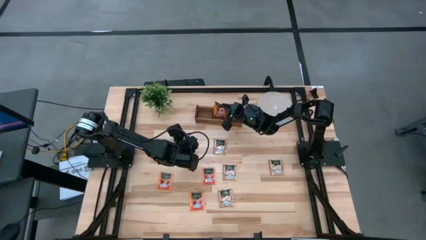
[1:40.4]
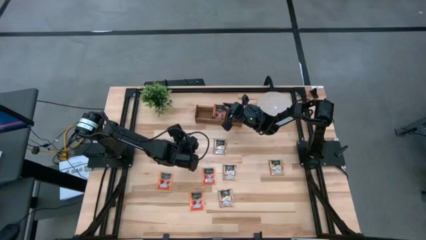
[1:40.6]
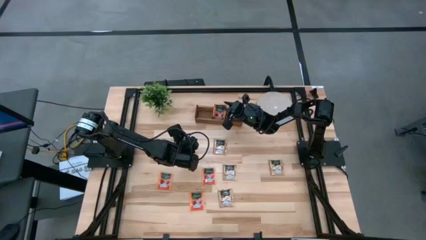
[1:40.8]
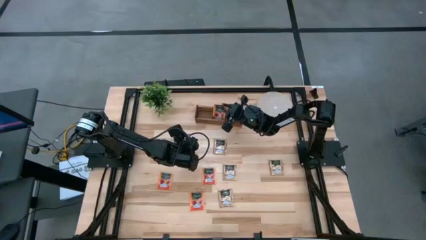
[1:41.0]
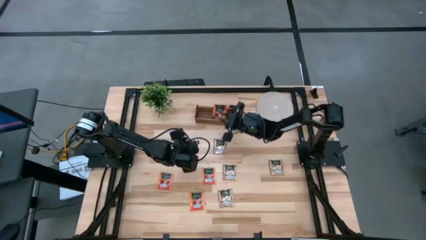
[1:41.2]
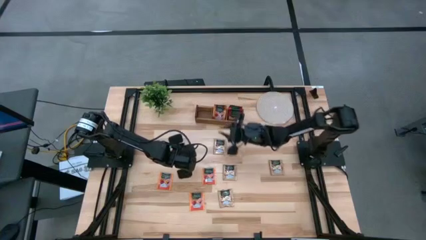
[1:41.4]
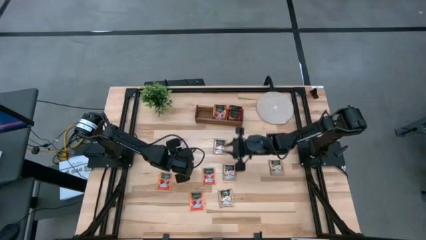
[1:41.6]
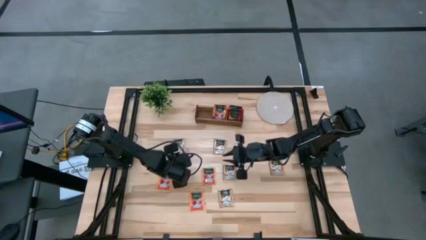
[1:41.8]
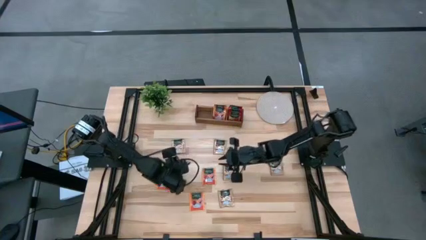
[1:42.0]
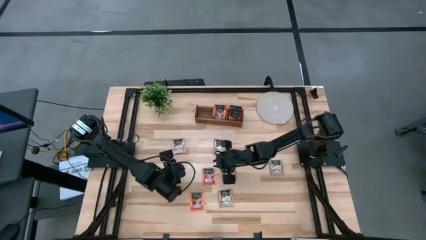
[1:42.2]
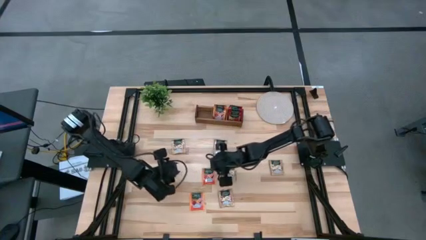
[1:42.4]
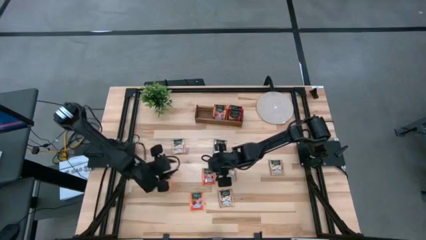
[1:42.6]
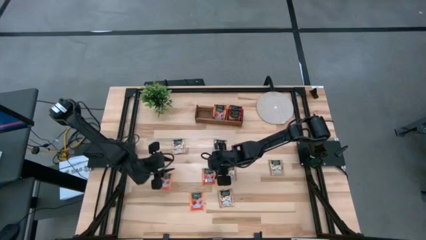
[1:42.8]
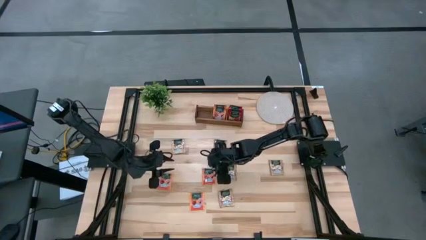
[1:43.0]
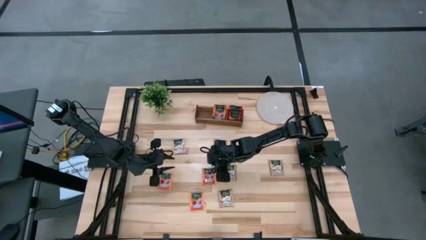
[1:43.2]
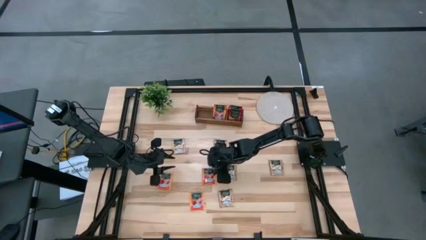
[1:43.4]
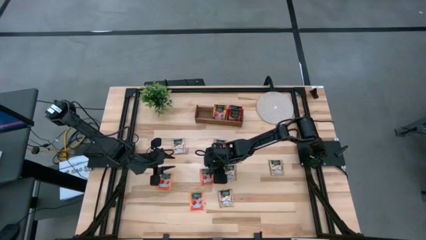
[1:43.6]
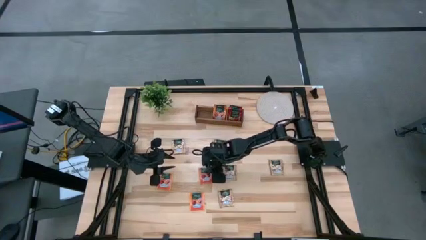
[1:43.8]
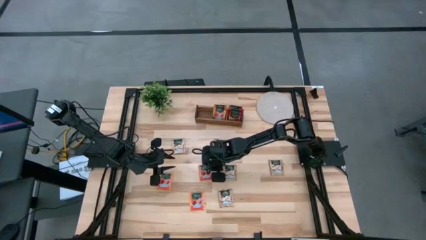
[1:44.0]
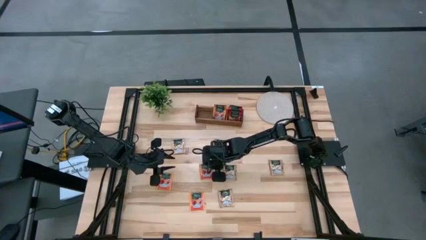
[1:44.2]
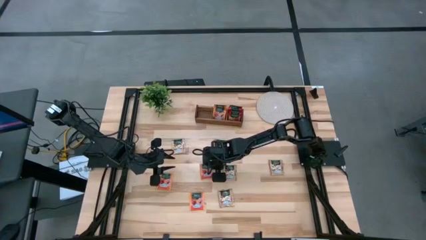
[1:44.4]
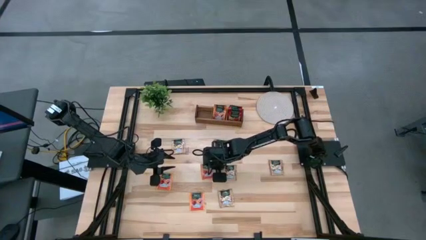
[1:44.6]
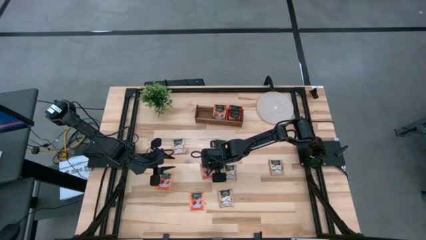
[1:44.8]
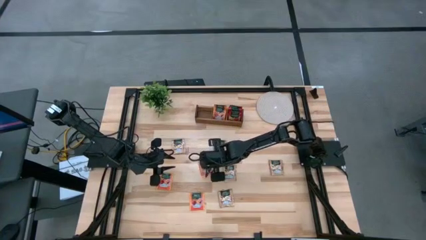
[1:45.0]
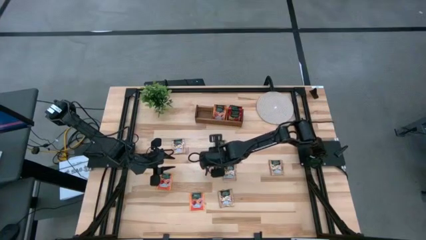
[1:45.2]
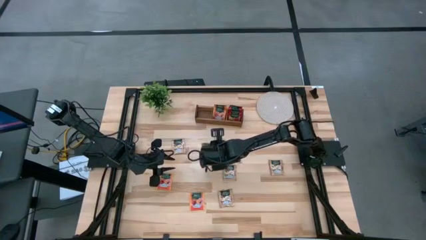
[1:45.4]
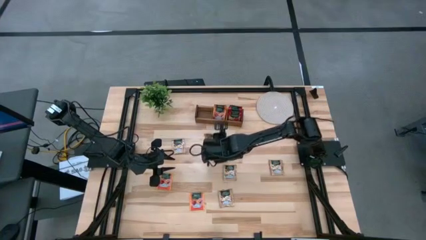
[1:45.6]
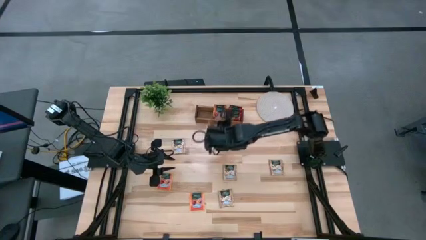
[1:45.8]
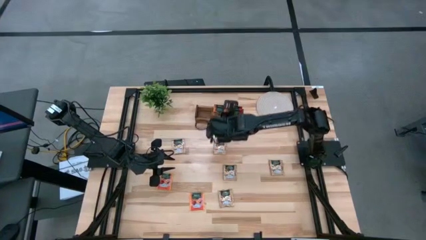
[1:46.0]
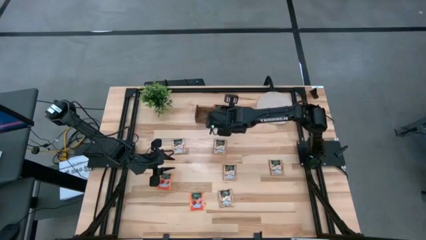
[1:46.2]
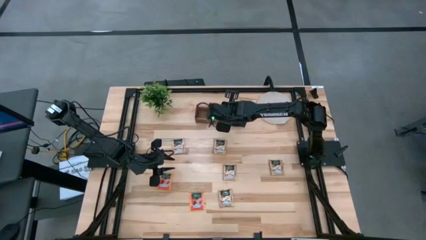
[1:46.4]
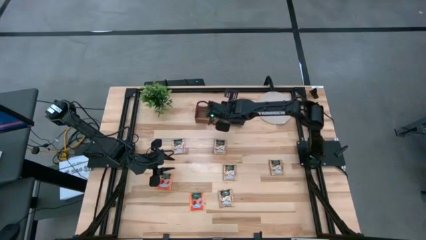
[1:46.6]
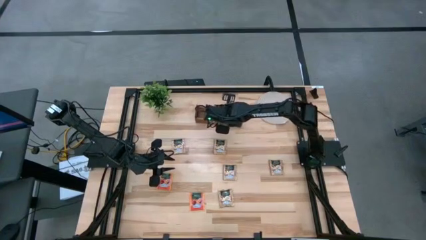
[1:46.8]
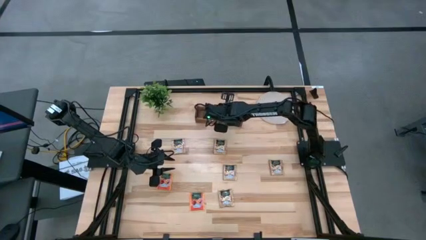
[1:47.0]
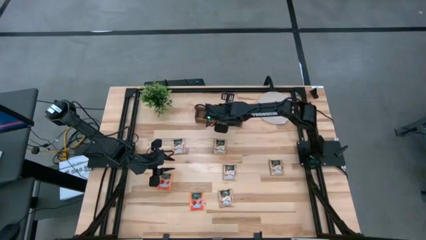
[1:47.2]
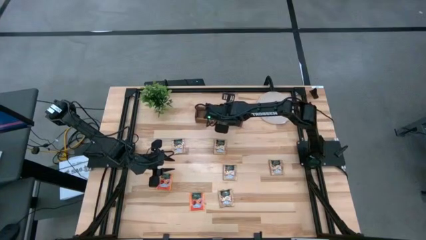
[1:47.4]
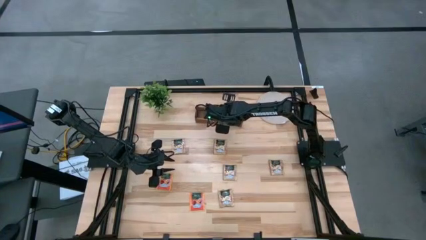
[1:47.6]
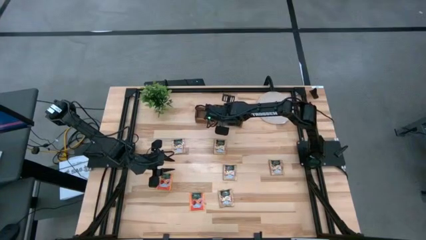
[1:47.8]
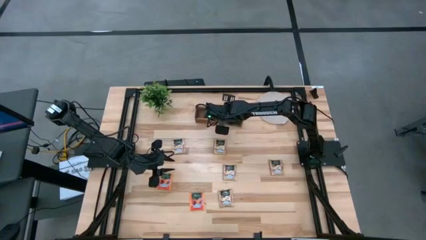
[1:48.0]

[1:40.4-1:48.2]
Task: Pick & Place Tea
Put the orange tea bag into the middle section of the wooden organizer

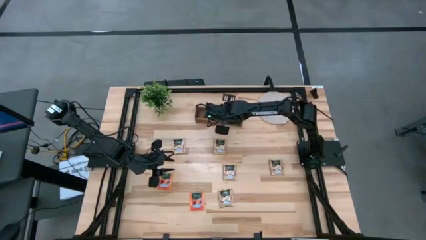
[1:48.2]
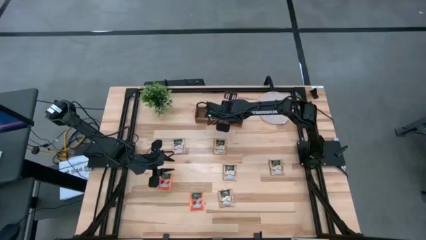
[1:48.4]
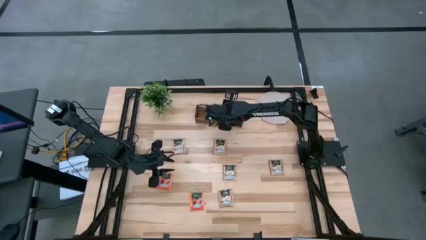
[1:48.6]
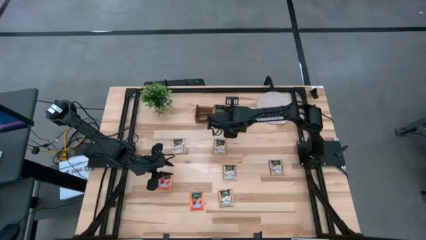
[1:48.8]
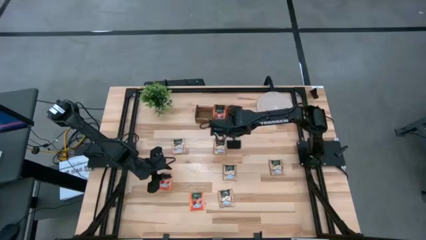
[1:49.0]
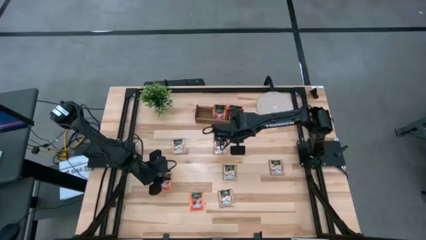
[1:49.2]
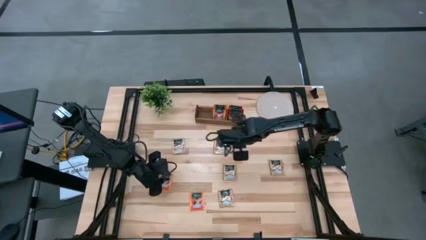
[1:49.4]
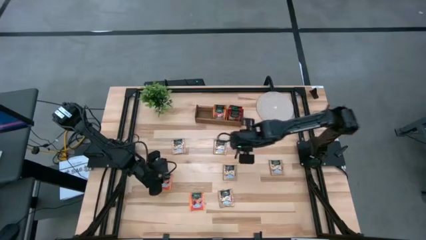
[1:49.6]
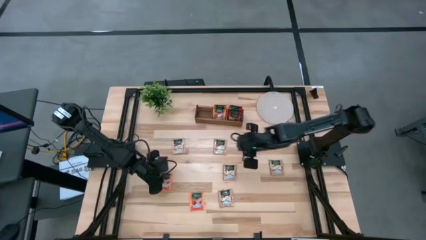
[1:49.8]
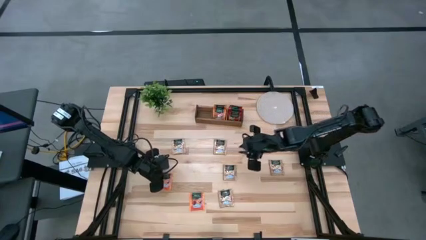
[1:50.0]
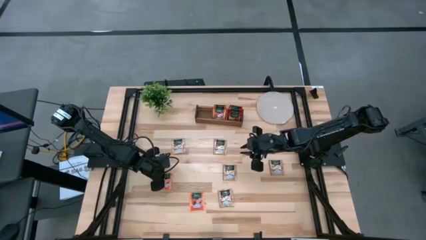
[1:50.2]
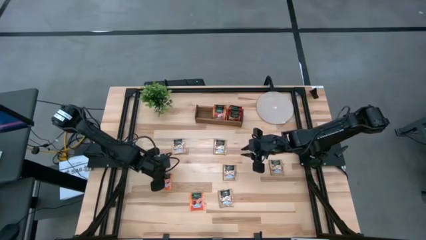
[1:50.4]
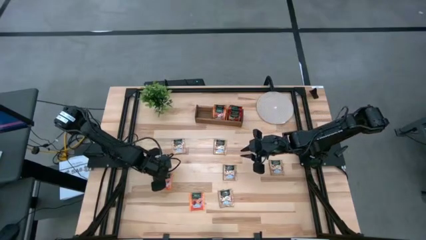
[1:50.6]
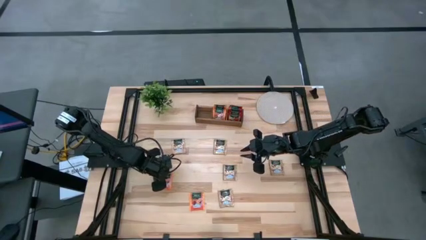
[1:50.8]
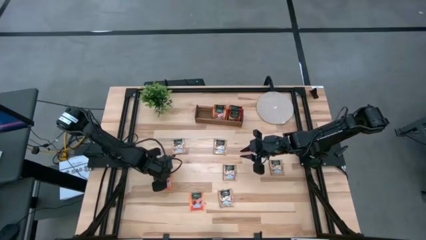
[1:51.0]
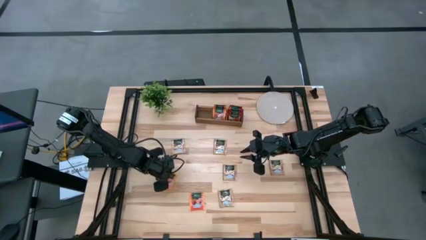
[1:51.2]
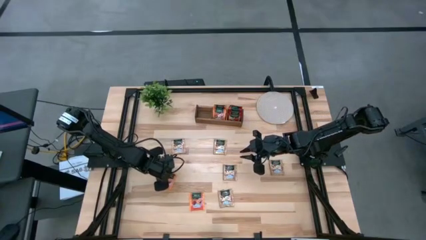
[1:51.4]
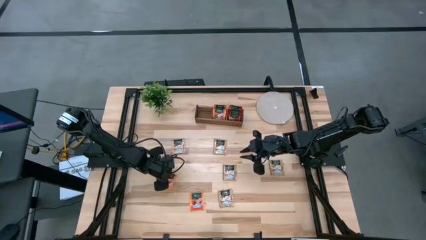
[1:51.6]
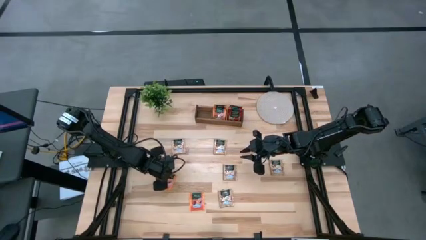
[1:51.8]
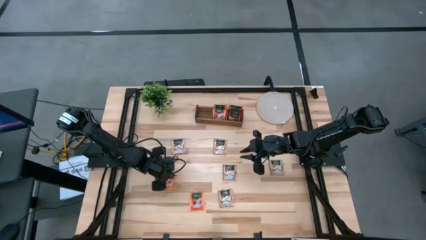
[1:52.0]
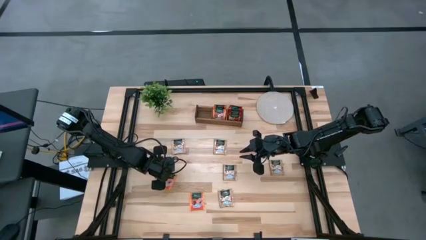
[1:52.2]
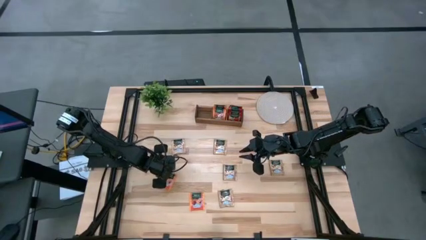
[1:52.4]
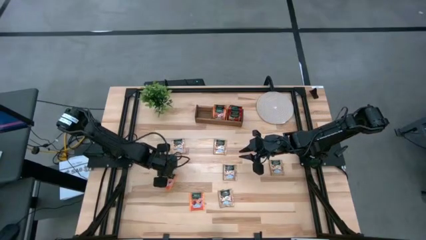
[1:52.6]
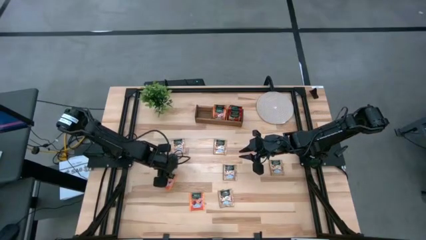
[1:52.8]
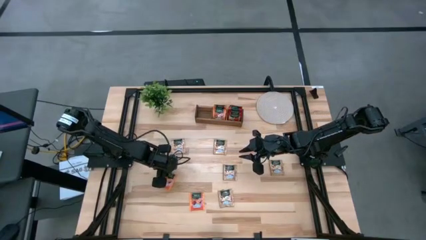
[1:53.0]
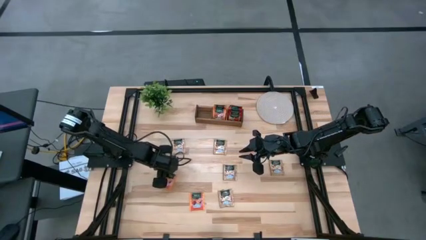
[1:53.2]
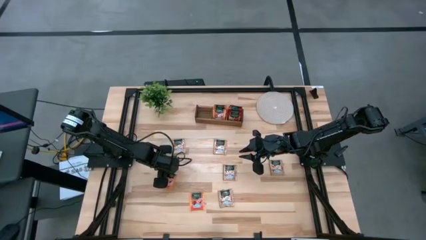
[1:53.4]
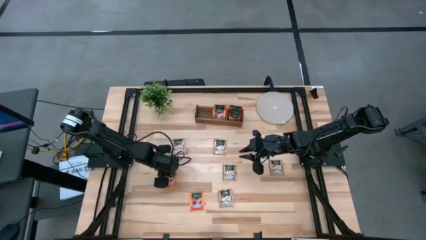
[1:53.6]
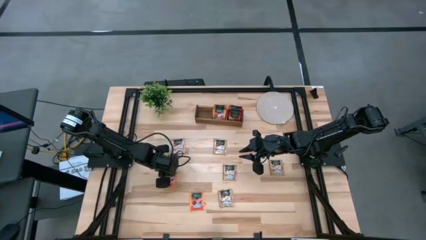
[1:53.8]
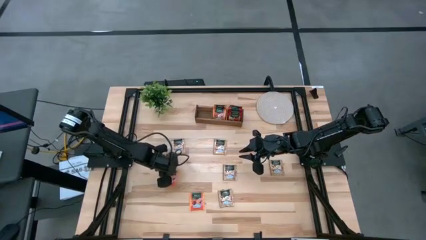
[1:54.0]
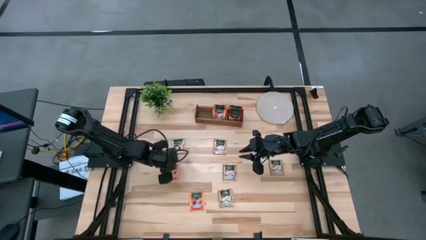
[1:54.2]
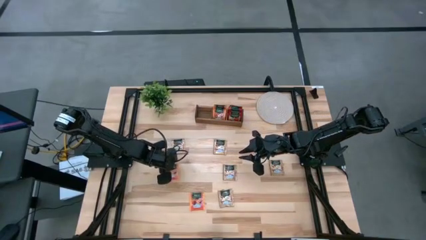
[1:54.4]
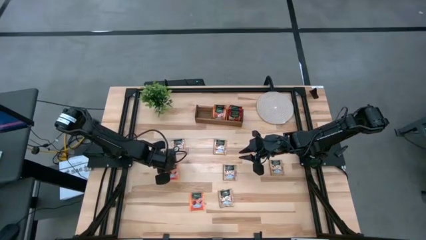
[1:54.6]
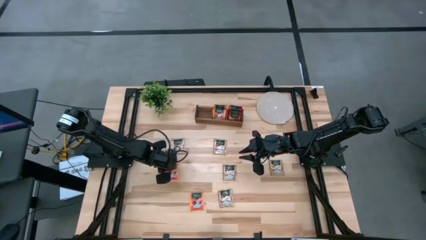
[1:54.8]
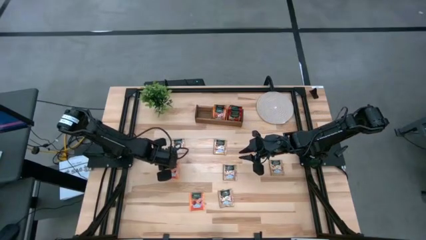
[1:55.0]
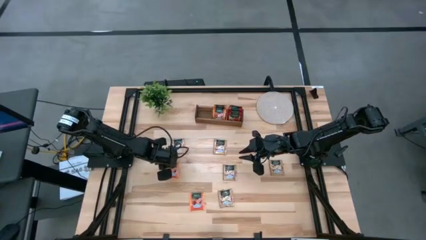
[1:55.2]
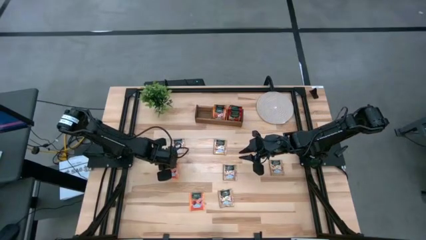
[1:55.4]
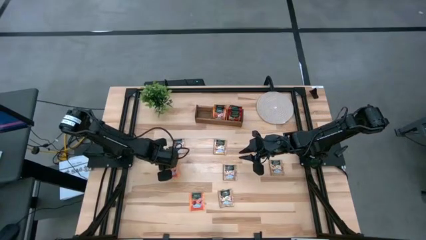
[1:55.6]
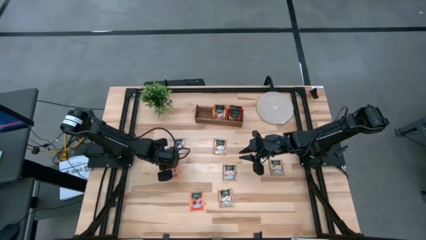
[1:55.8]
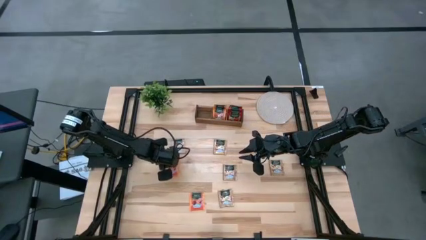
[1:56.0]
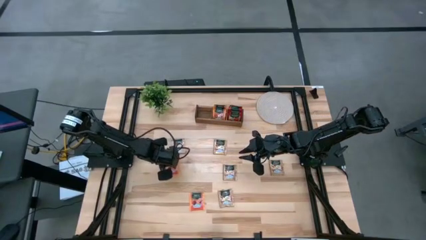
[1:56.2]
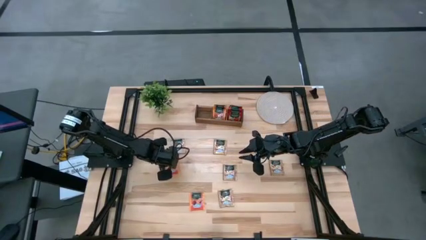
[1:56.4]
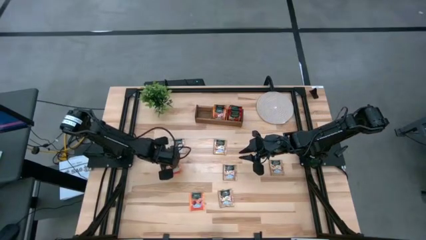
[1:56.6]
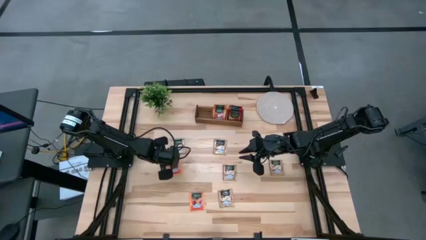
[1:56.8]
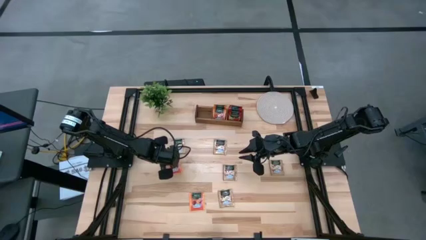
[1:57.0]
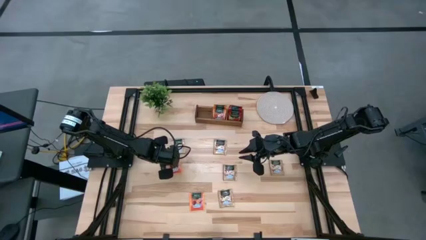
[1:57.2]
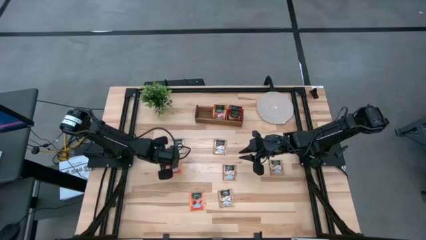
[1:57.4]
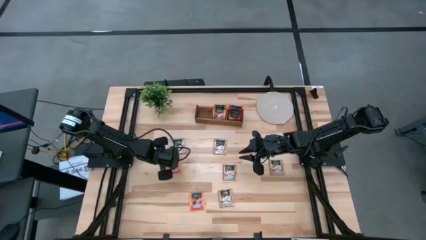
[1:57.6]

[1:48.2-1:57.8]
Put the orange tea bag into the middle section of the wooden organizer
